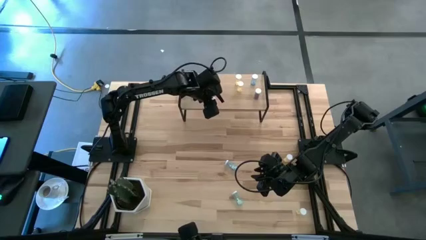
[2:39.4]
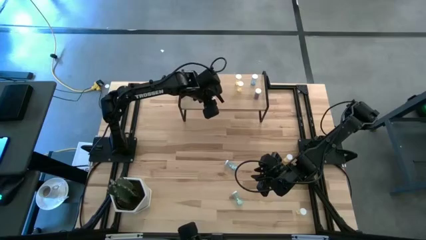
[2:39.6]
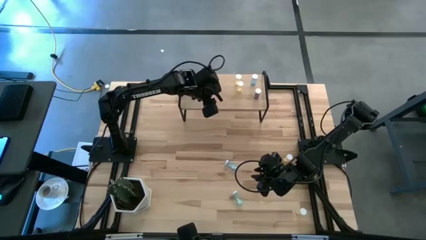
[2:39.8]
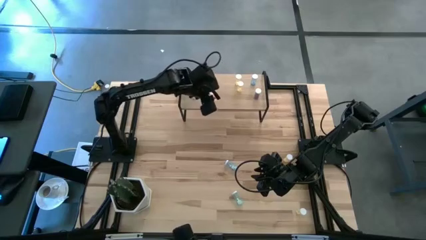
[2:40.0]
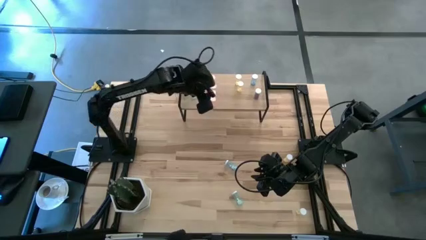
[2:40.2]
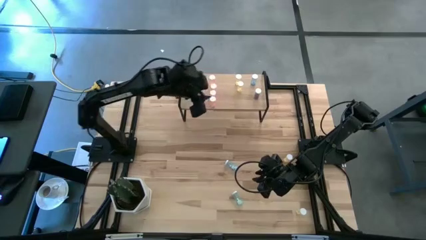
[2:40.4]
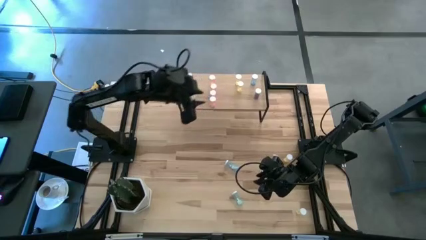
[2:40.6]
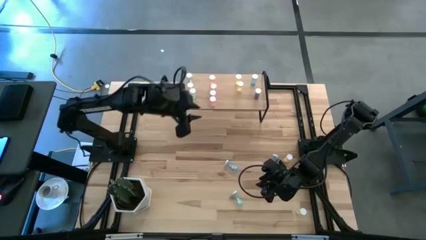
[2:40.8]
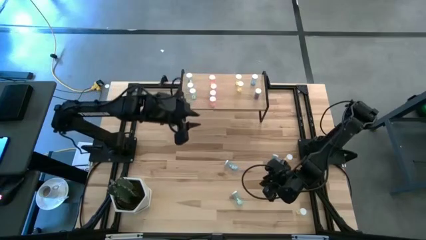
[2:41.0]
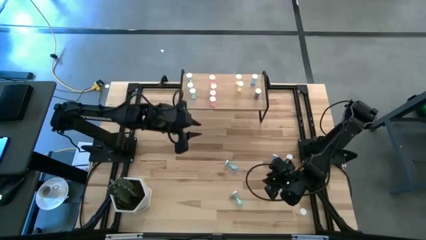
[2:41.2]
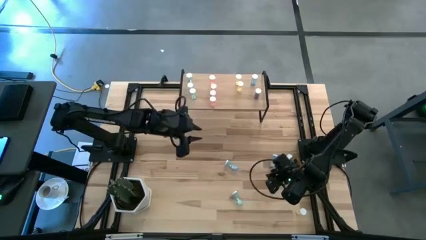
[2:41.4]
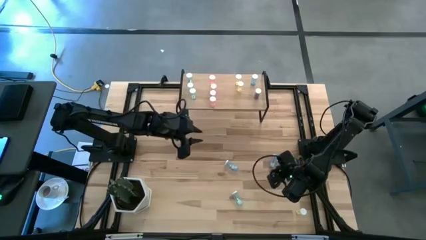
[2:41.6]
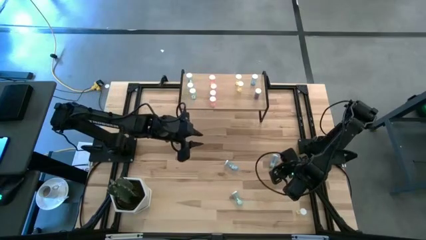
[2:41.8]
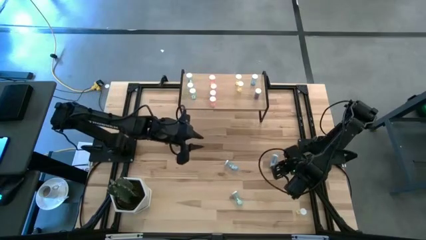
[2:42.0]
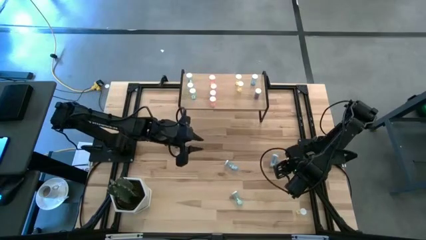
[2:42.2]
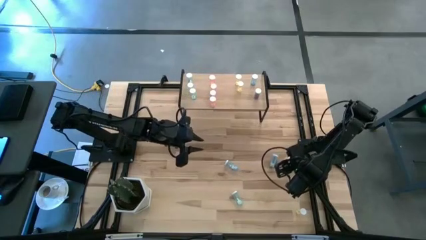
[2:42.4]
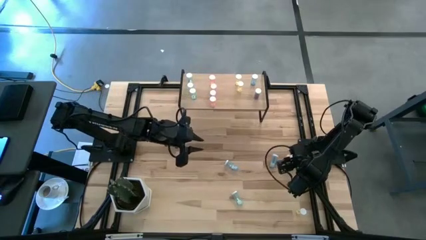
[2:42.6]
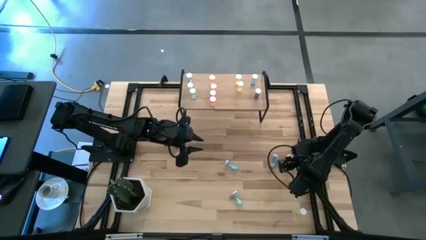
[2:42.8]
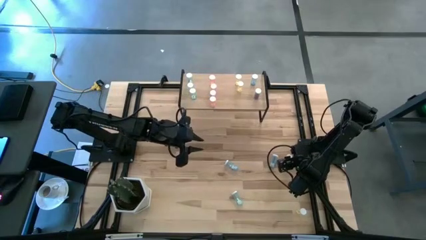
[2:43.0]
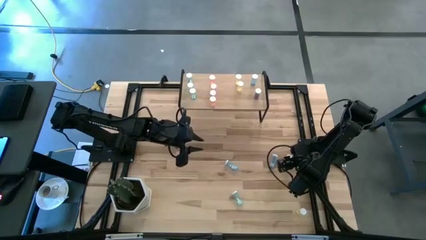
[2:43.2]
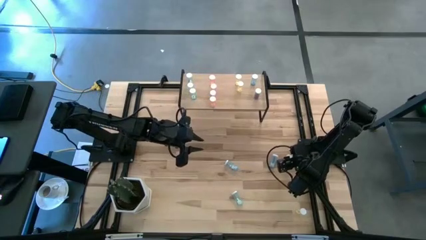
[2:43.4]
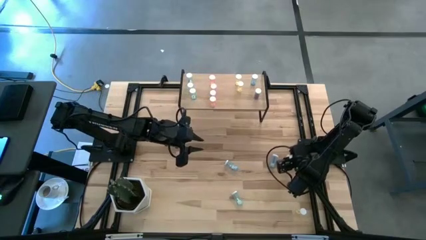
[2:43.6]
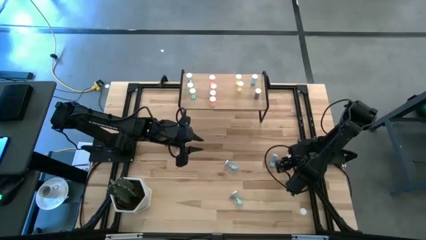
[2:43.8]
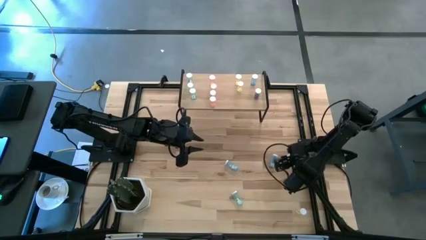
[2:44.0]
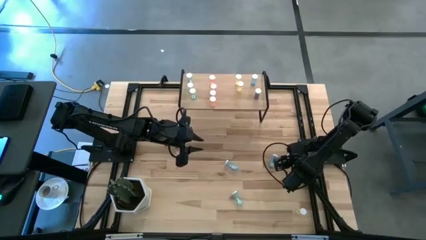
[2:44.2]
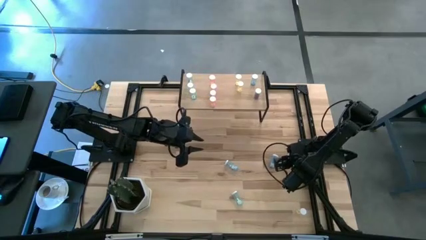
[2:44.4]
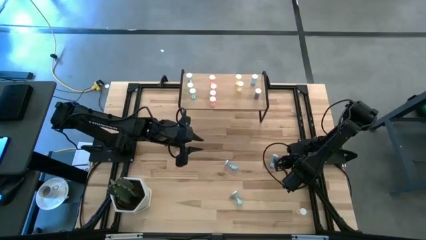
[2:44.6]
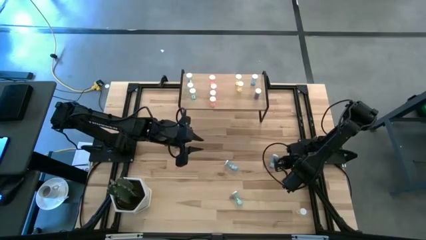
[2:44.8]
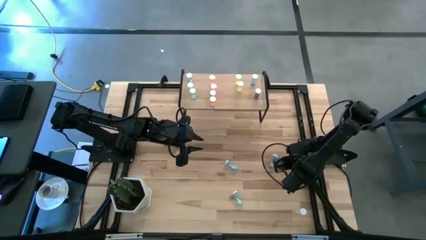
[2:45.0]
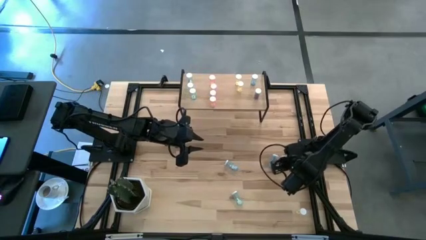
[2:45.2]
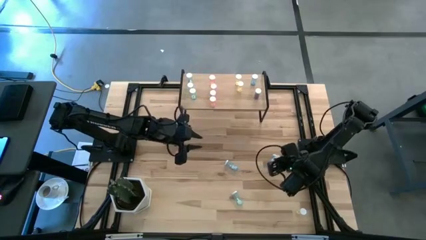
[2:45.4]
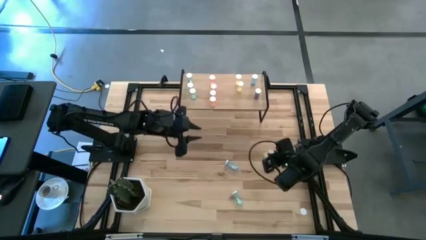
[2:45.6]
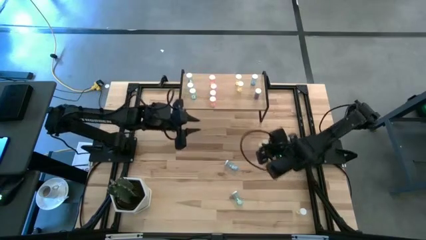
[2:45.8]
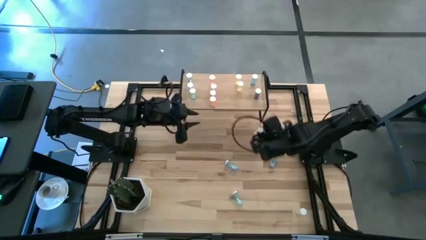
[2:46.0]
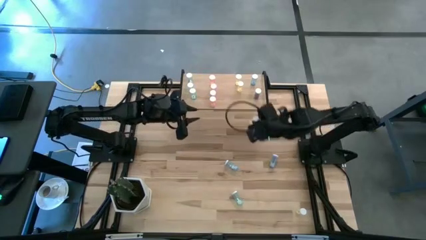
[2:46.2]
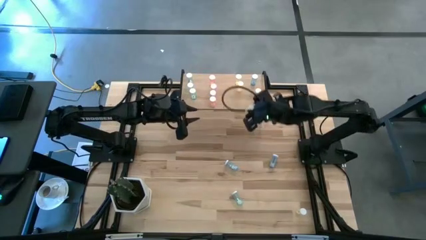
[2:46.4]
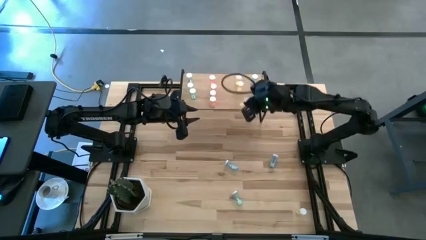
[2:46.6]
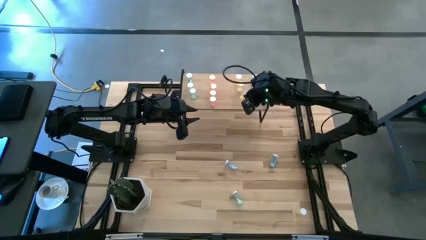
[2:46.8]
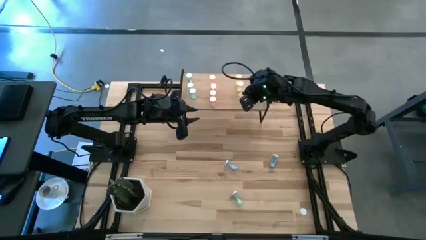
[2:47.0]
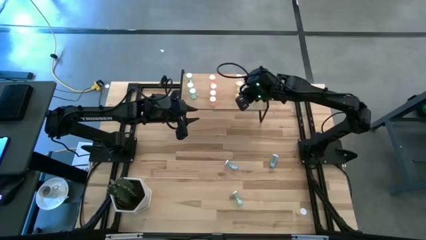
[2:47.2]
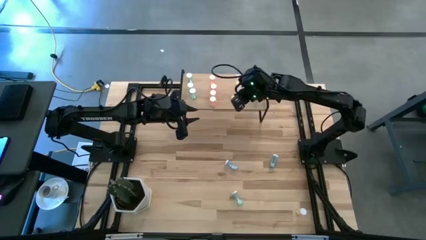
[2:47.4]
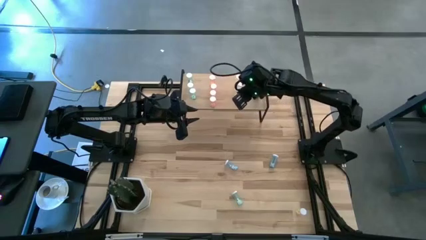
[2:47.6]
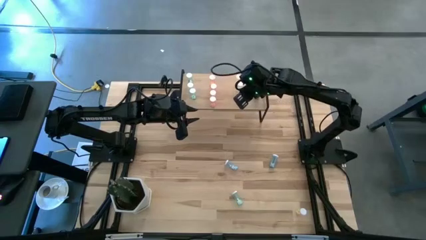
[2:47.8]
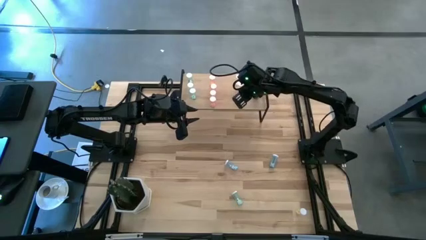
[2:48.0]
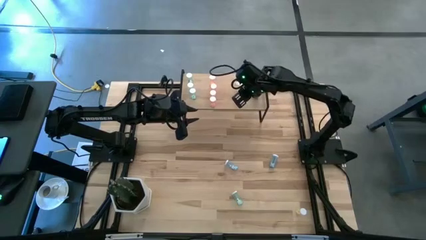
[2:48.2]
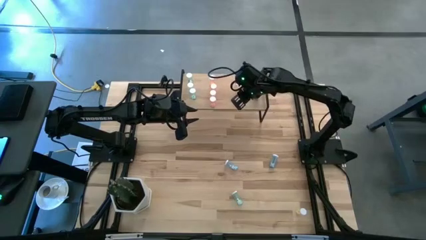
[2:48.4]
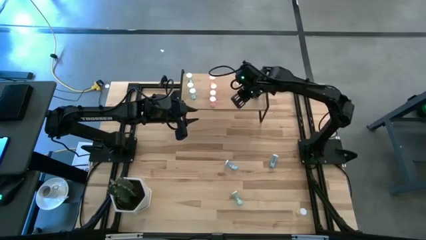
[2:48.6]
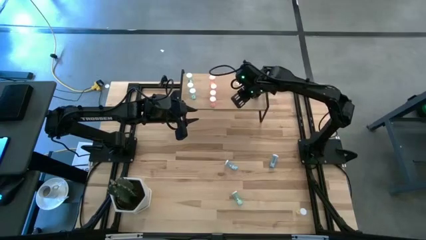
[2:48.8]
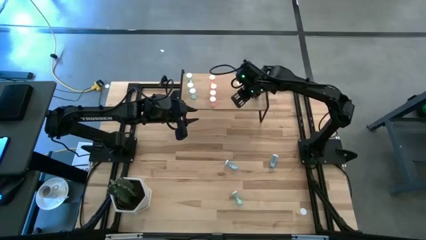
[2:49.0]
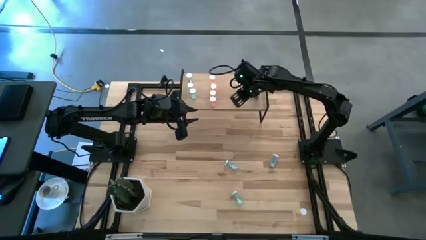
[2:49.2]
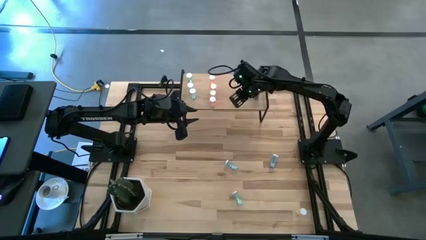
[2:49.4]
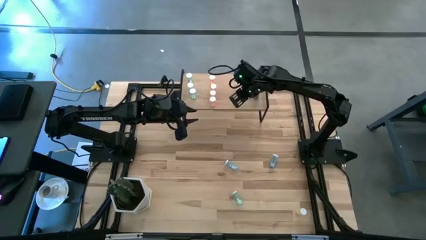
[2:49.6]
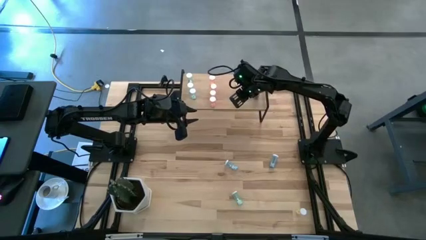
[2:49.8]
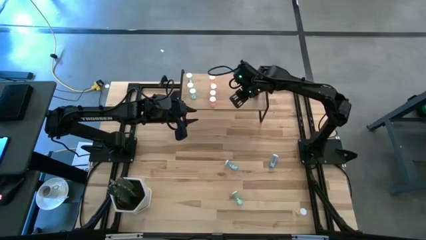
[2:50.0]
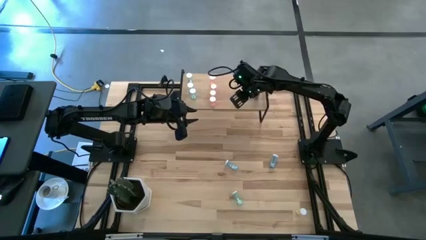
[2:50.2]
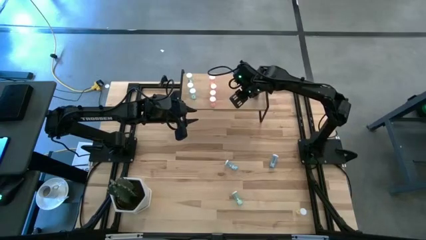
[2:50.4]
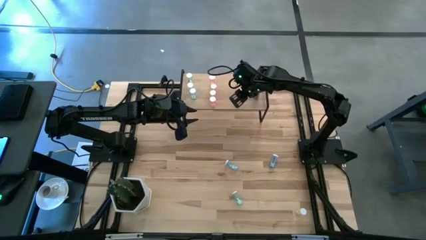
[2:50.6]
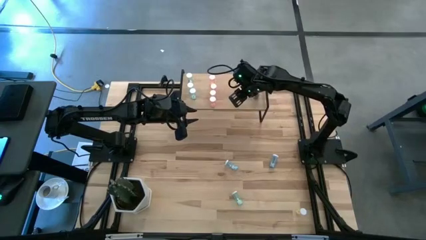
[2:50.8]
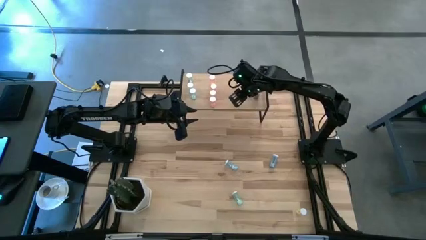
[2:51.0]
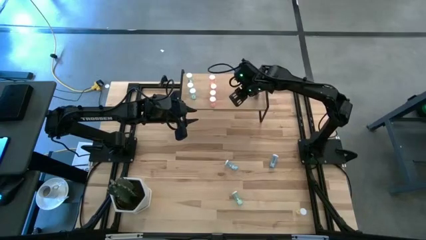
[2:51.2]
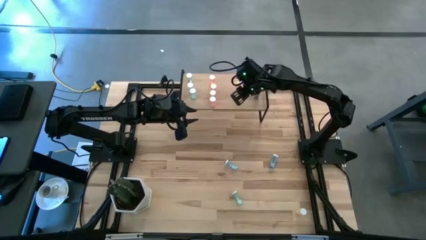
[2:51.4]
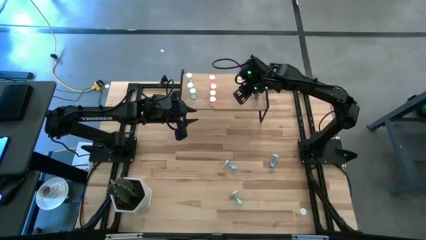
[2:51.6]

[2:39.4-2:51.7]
Task: Pick and place medicine bottles onto shelf by color
Align the yellow pill bottle with the yellow pill bottle
